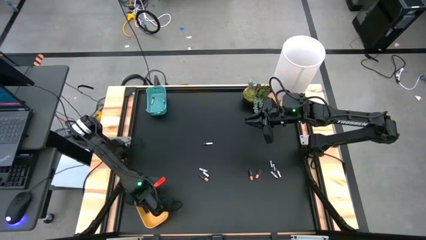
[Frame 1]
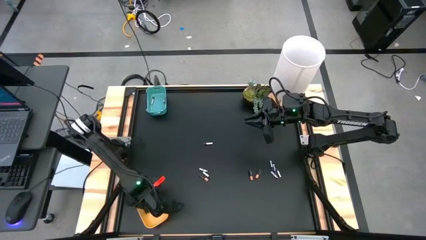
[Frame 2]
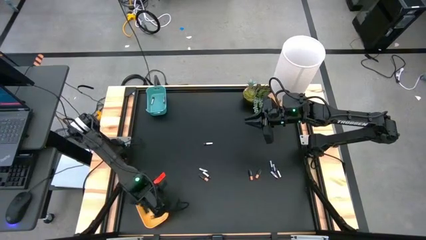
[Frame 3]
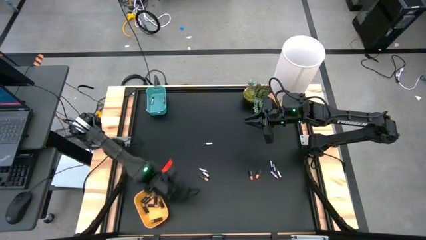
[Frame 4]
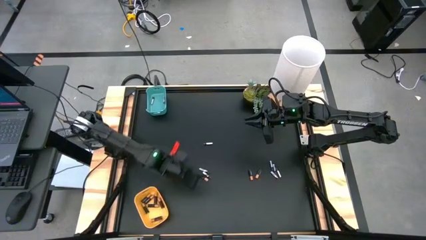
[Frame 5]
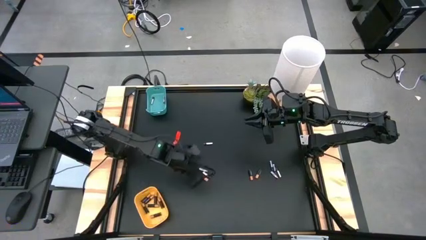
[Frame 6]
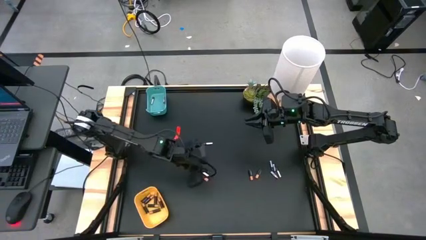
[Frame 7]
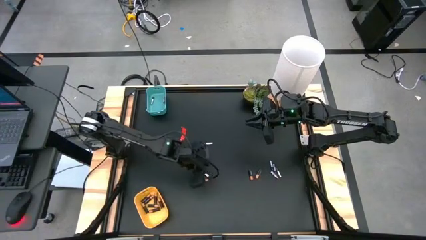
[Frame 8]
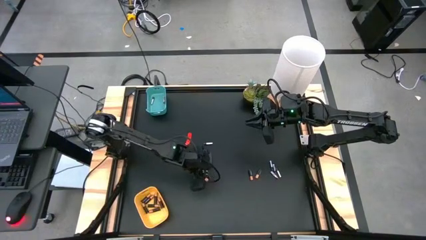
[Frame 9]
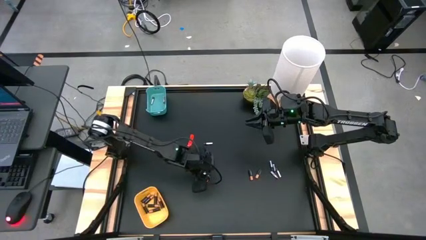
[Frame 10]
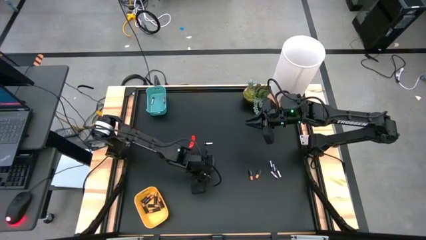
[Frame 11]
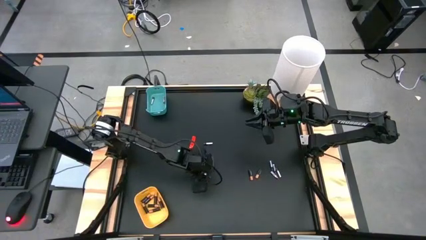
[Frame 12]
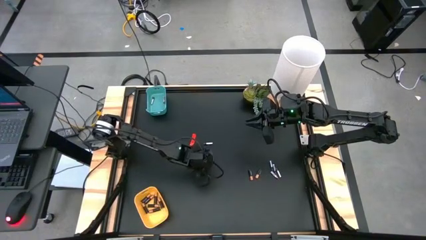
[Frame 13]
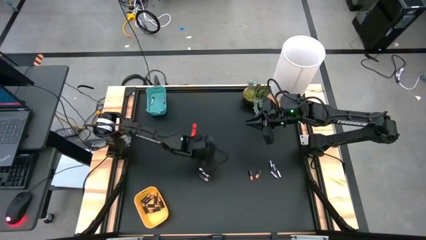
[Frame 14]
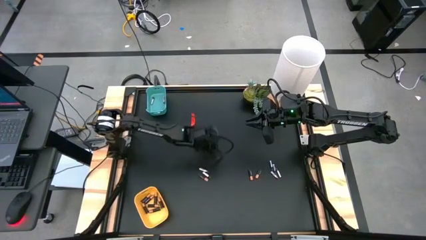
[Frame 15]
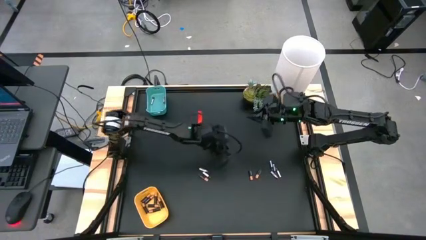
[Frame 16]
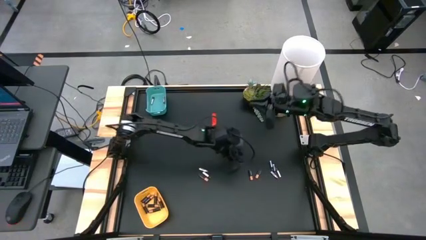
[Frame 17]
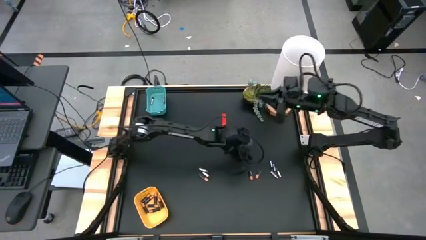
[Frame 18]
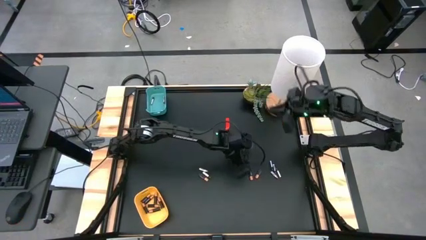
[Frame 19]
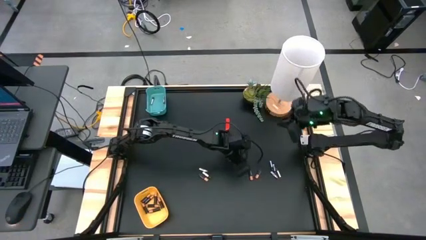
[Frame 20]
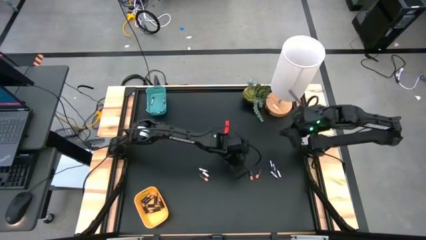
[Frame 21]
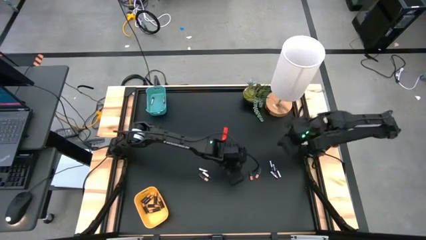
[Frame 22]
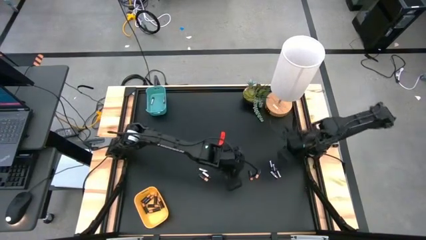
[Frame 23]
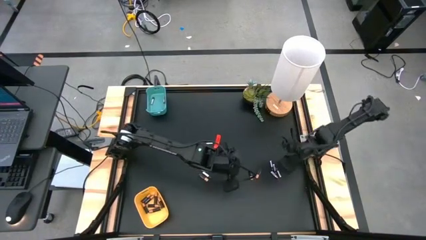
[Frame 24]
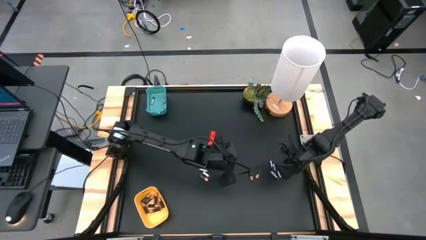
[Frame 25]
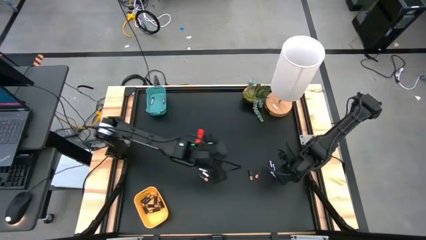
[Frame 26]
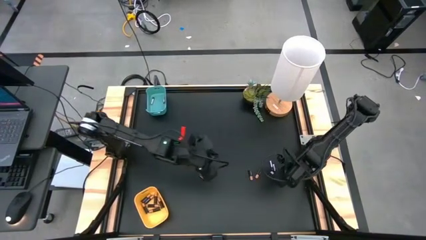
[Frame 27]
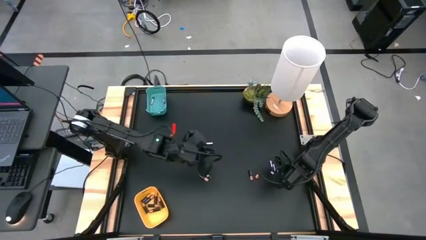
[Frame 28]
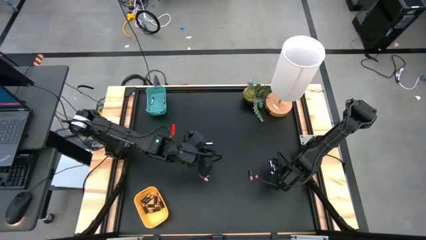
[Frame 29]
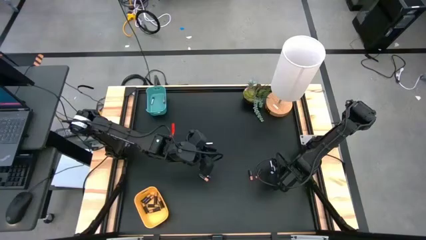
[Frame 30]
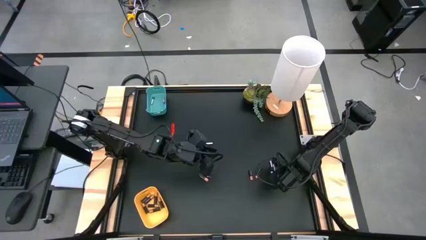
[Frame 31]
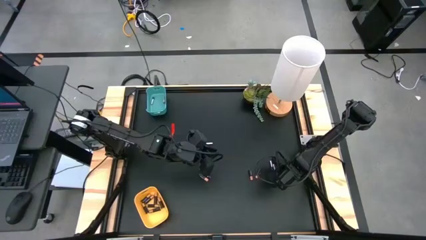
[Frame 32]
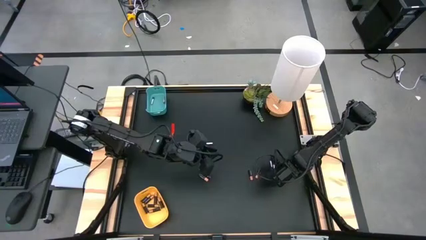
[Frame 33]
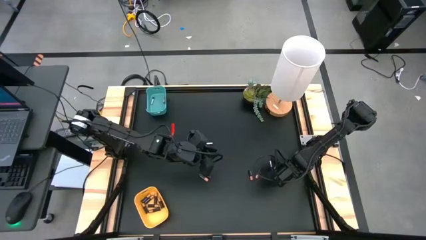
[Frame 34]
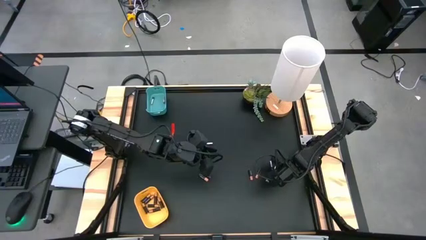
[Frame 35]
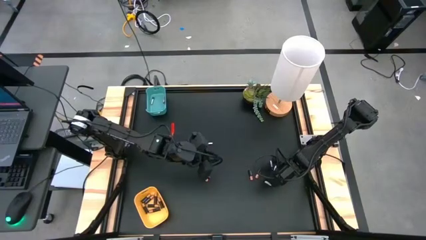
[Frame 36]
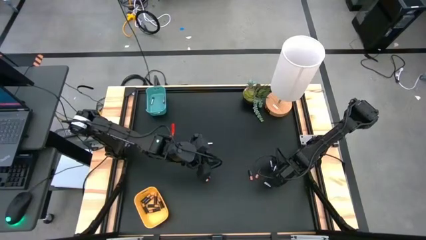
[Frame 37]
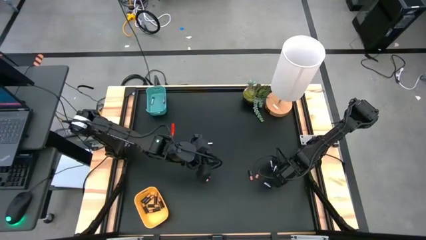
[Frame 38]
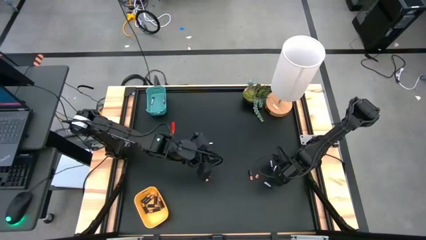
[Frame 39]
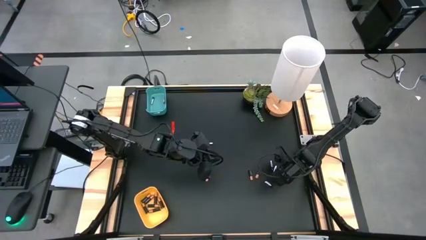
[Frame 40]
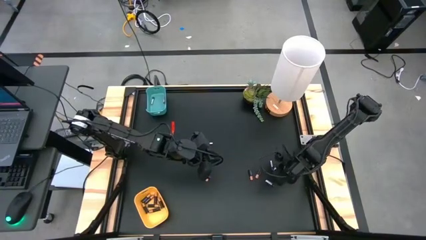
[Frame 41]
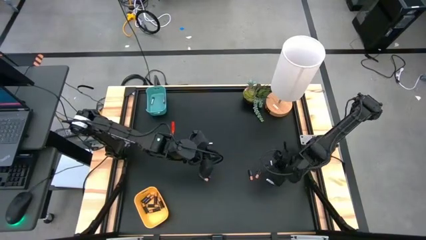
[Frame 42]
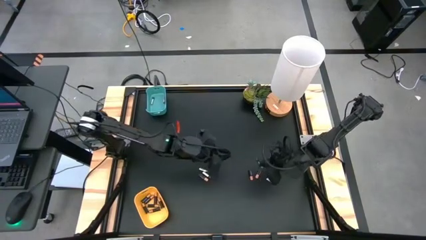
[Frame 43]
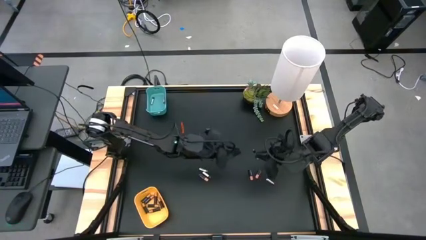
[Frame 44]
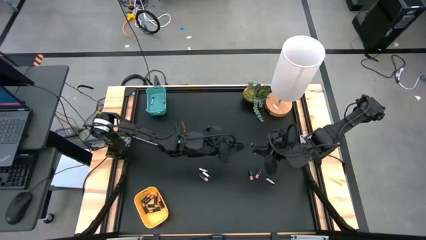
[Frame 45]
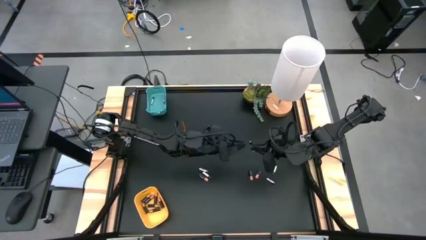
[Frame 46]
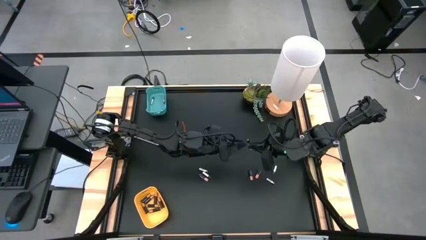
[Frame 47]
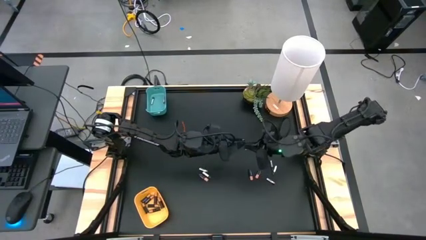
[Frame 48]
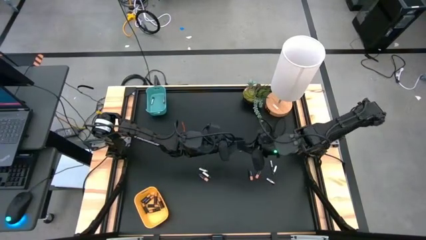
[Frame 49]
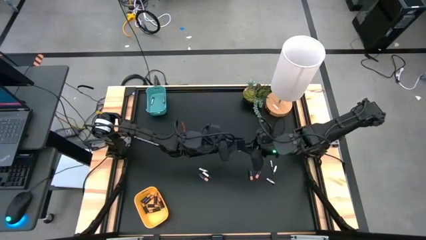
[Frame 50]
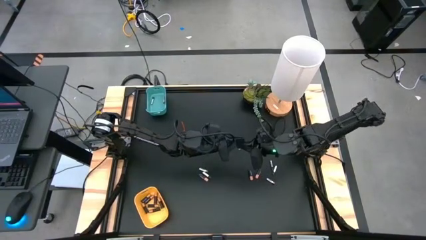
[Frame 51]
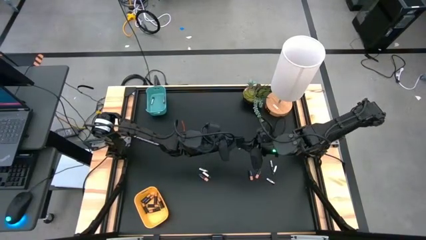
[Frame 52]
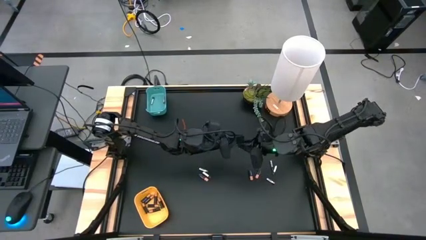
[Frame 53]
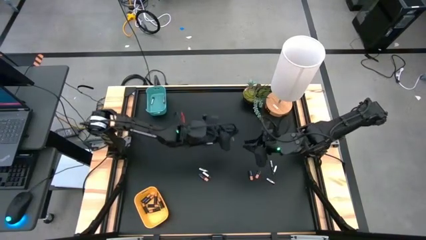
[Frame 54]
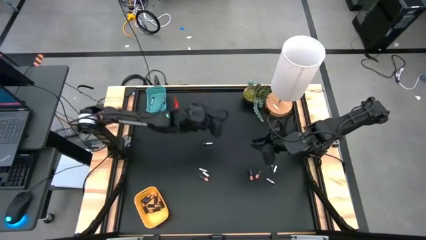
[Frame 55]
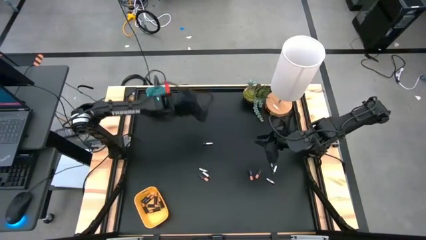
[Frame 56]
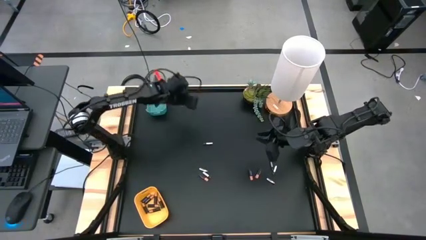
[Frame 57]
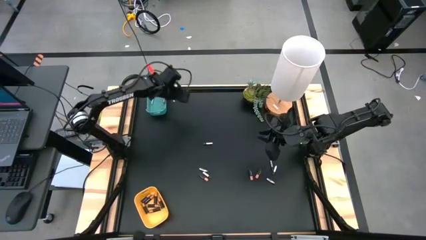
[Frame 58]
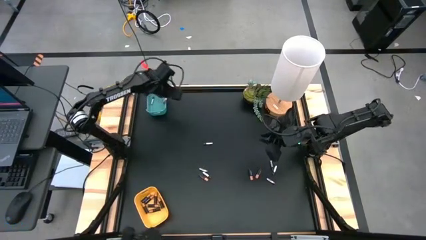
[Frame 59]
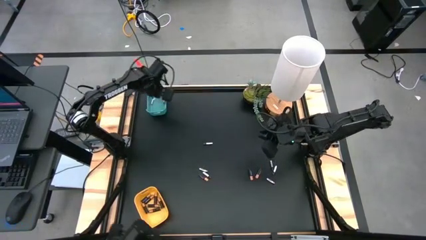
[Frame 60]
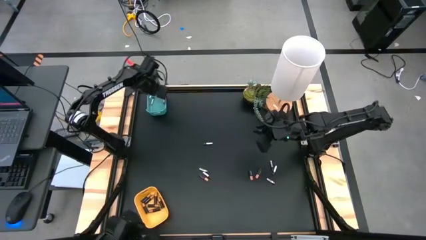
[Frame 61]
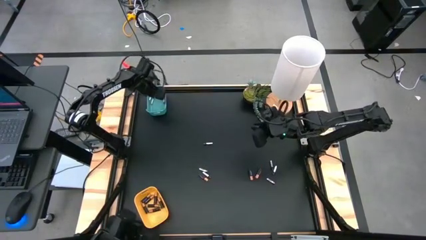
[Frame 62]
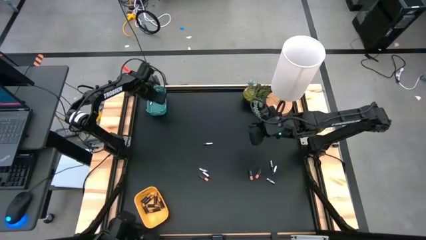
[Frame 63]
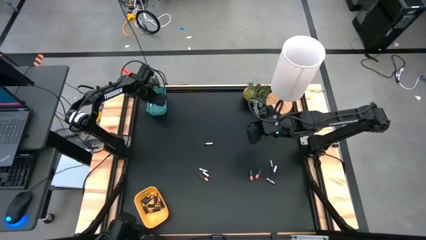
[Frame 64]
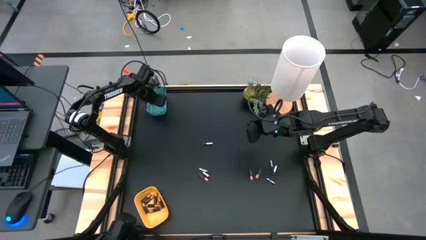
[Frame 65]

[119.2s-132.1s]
Task: Sort batteries
Put the silver battery into the blue bin

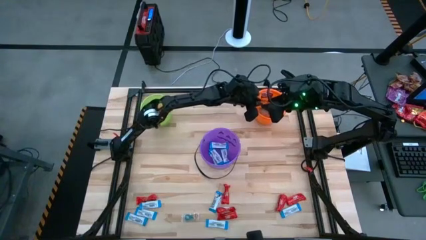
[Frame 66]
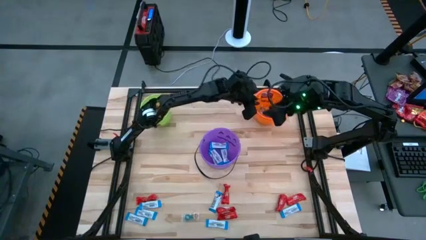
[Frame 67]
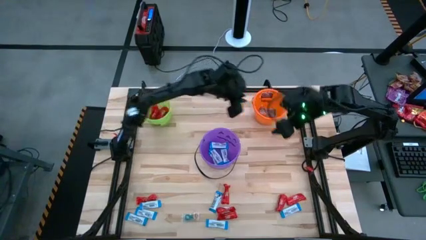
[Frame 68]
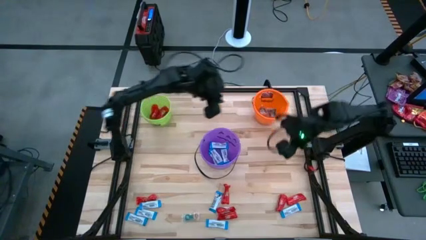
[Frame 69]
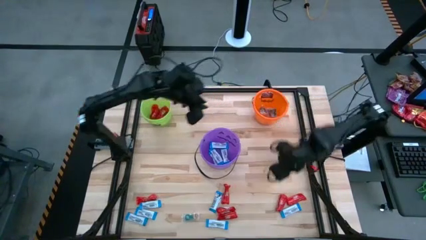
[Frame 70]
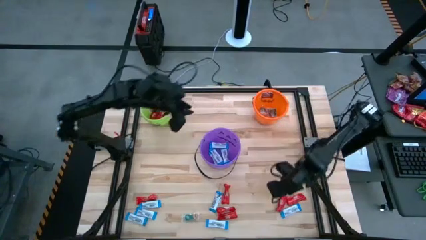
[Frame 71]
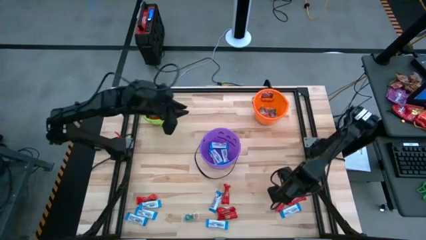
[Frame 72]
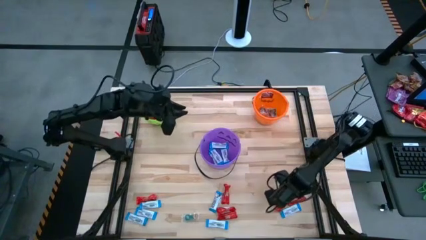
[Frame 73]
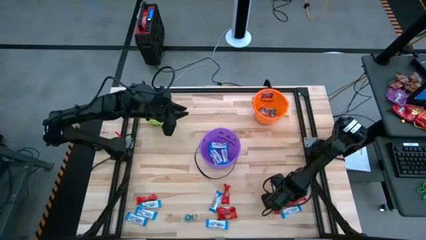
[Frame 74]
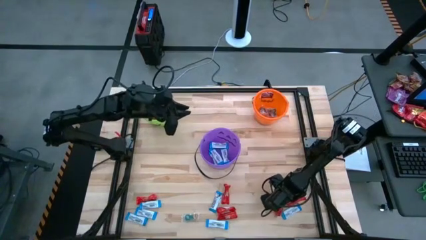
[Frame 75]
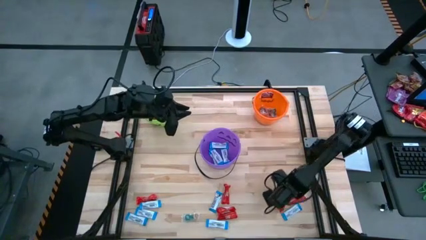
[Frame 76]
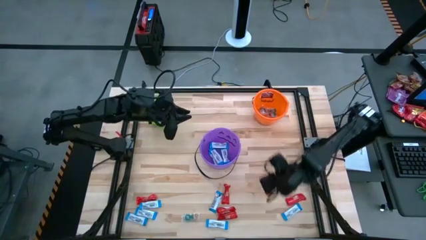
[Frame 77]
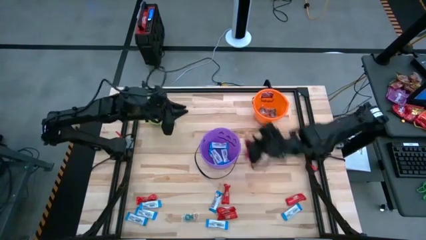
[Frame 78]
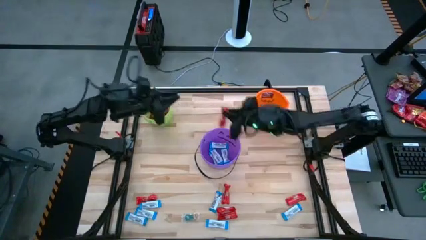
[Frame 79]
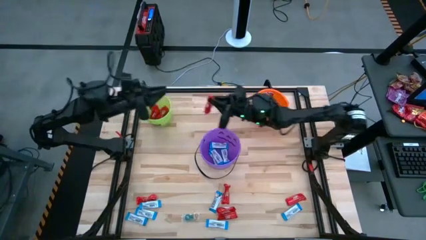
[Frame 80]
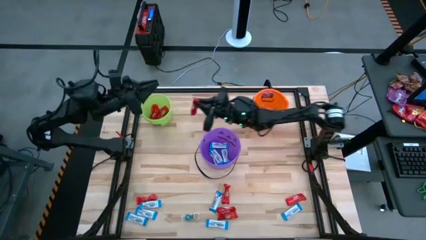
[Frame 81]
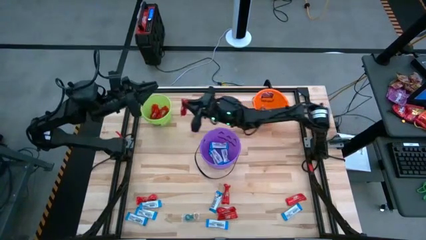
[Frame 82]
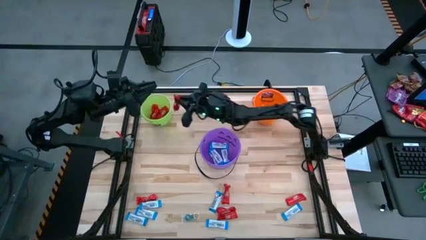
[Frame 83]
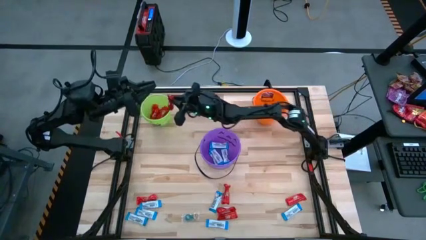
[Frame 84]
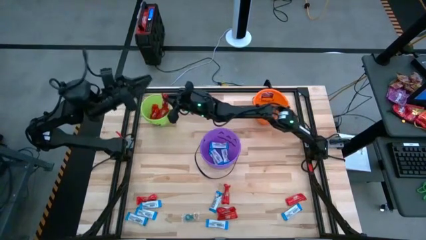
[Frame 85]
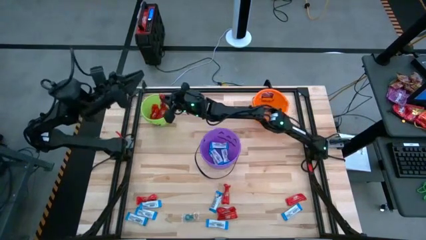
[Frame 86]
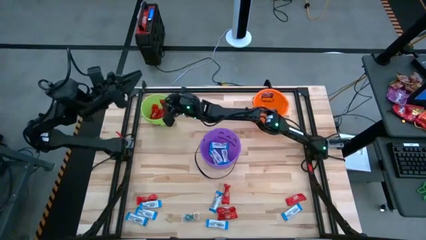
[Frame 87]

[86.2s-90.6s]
Task: Sort candy by brand, put in halloween buckets
Put the red chocolate into the green bucket
